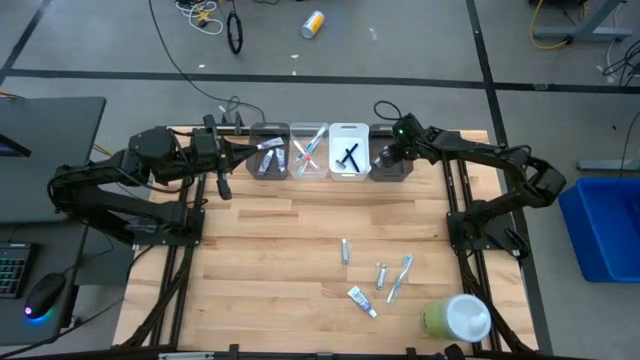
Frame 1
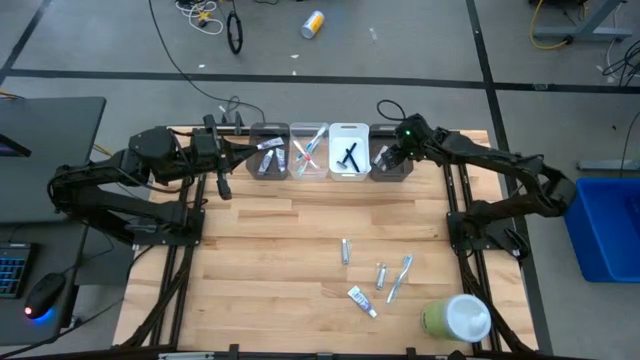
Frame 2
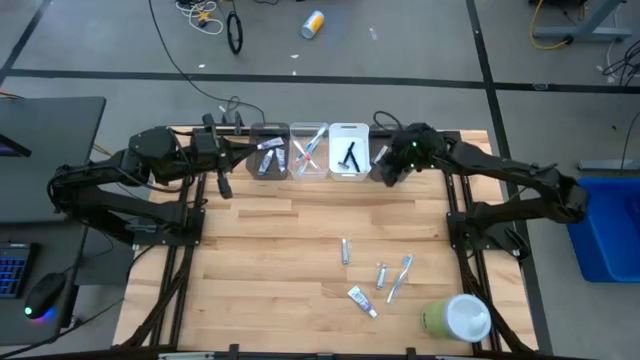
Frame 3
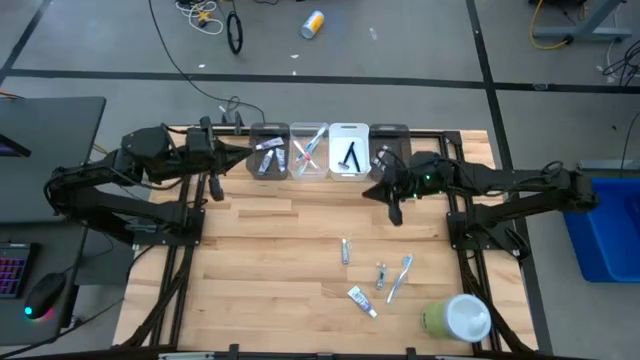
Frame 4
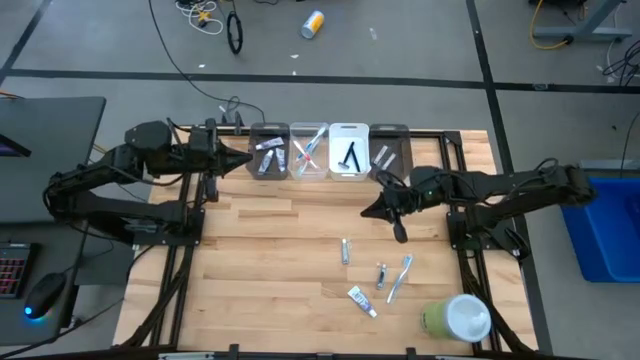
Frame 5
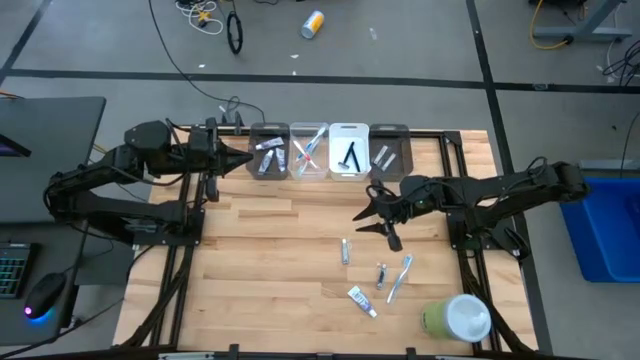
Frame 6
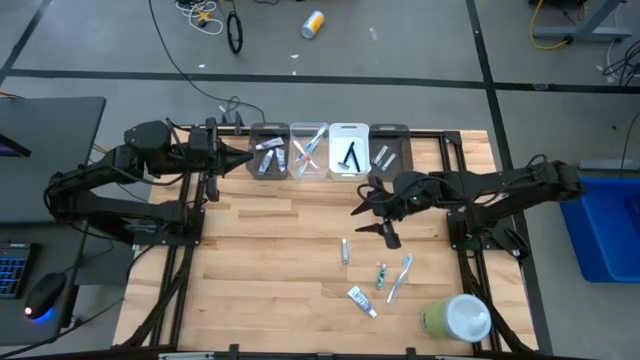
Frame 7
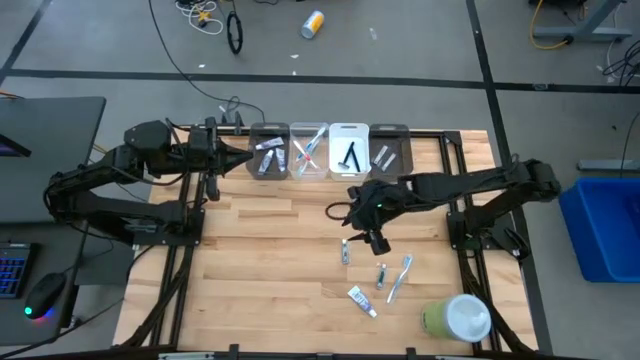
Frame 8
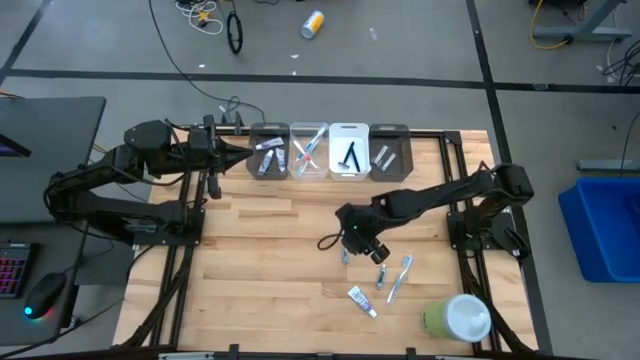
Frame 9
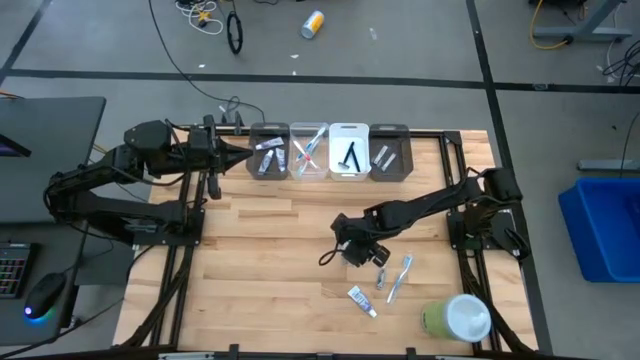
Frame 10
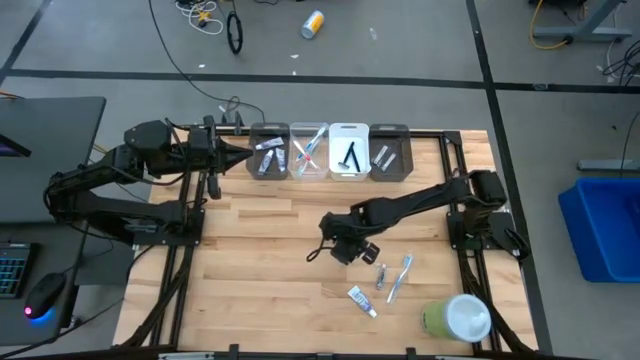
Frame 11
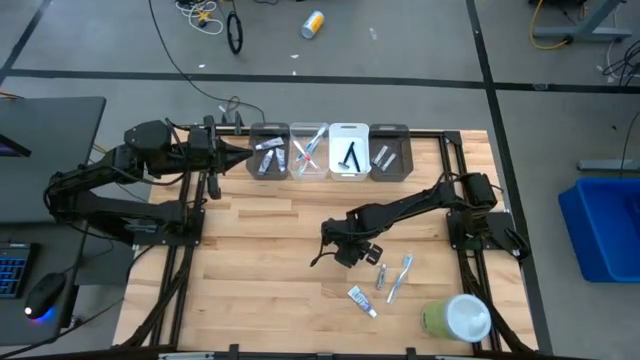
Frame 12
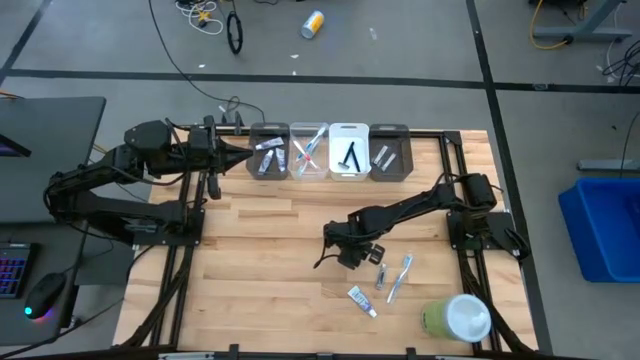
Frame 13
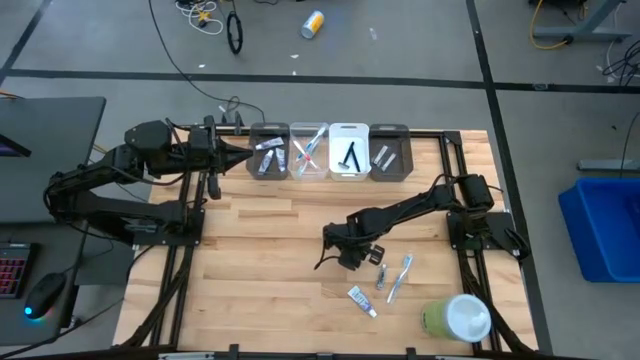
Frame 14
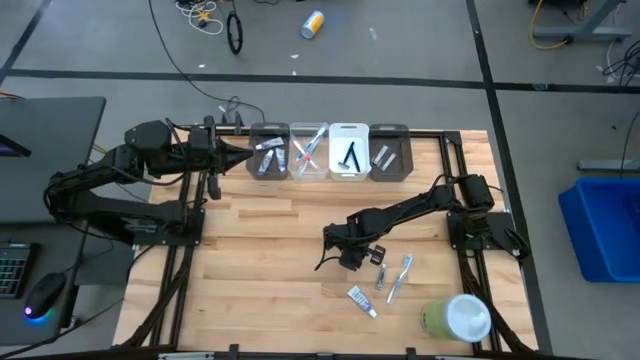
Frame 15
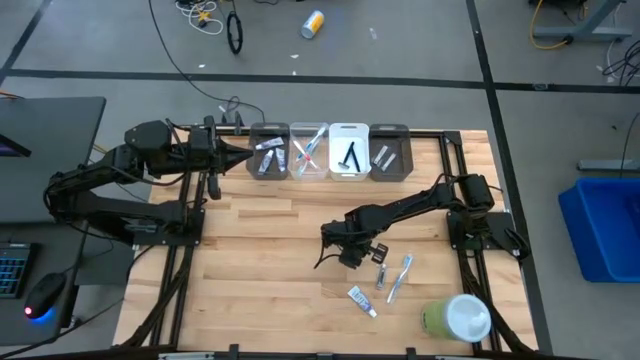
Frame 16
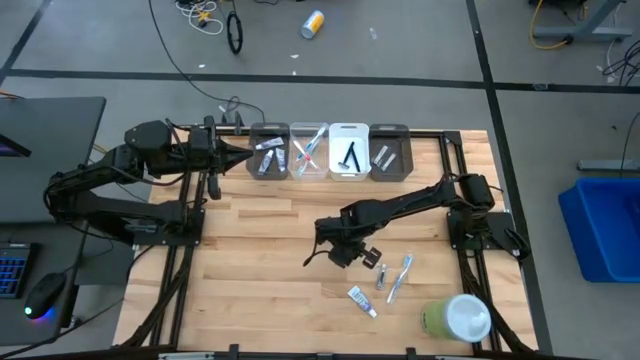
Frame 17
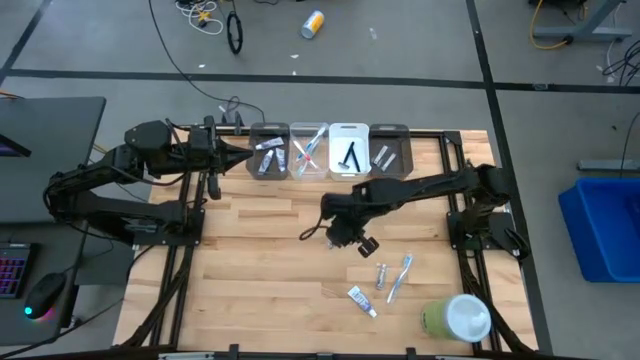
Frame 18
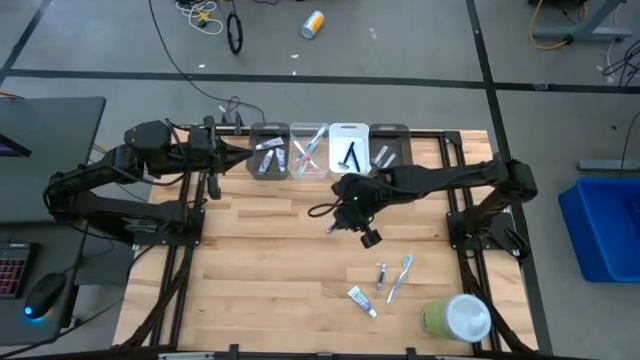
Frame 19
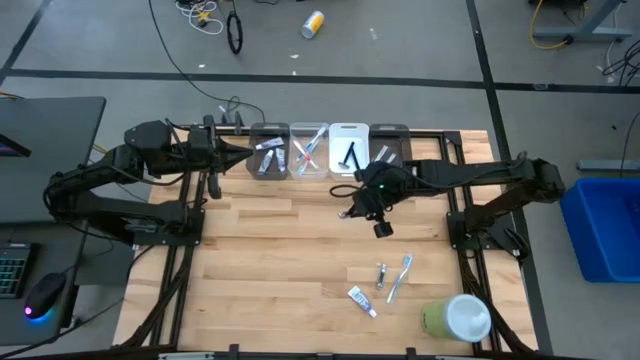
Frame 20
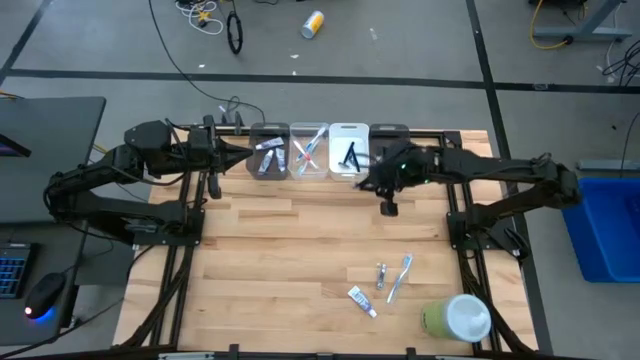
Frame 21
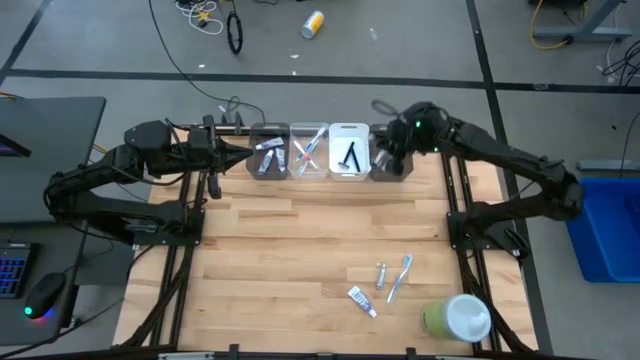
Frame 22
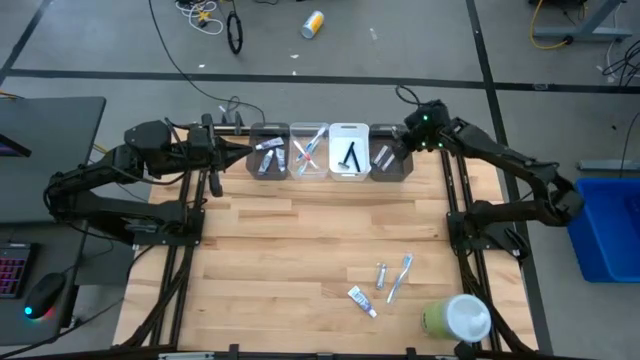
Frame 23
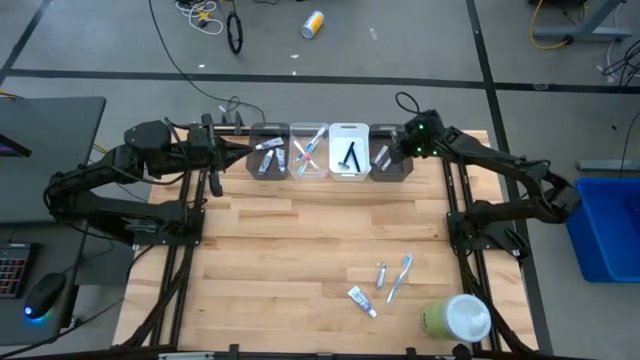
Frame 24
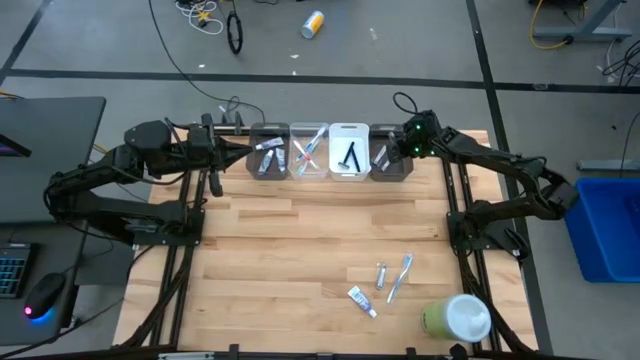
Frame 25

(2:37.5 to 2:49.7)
Task: Pick & Place Travel size toiletries
Put the silver nail cutter into the white bin

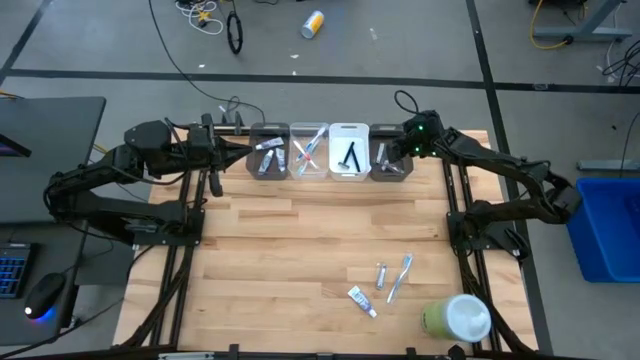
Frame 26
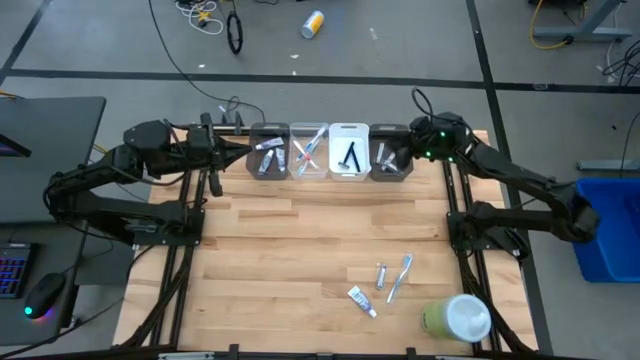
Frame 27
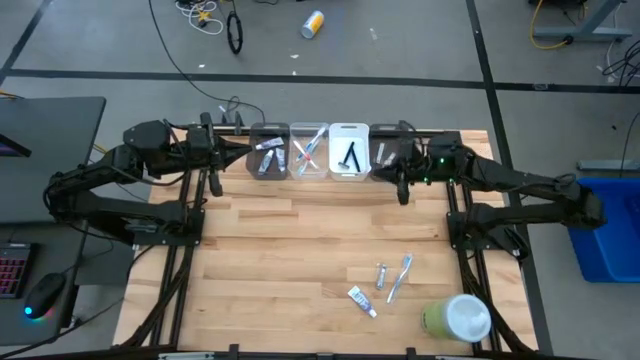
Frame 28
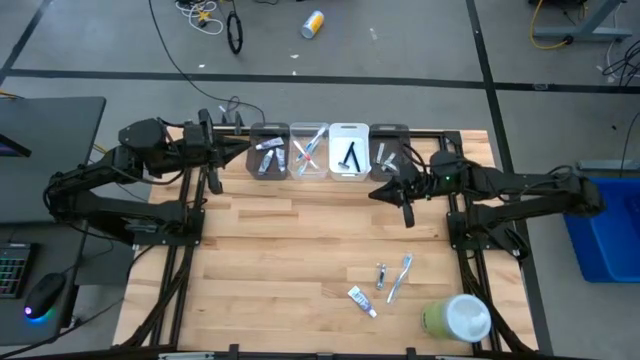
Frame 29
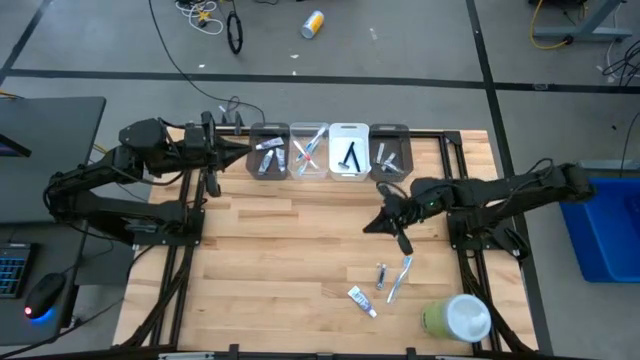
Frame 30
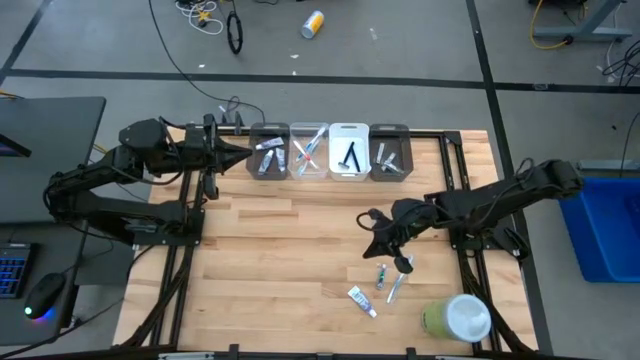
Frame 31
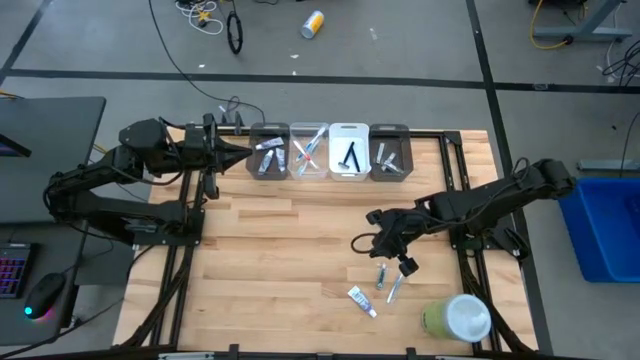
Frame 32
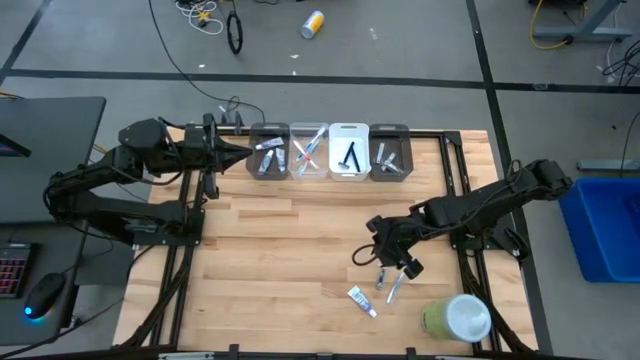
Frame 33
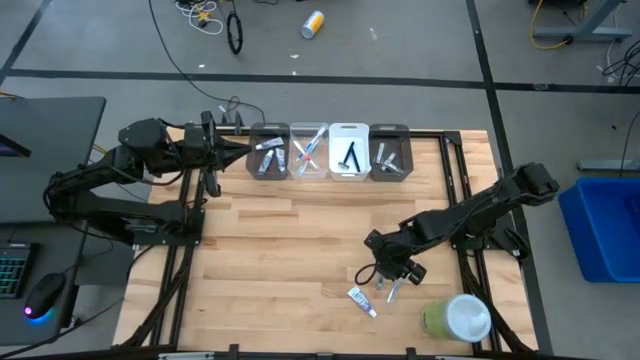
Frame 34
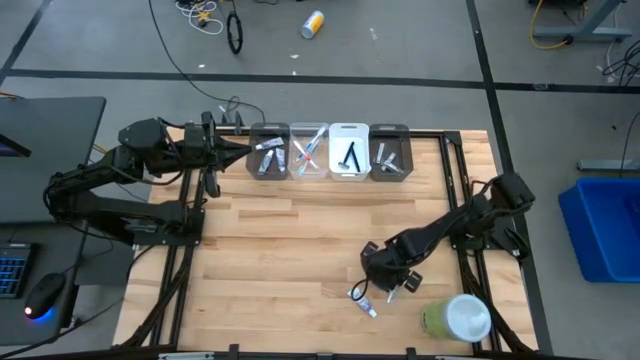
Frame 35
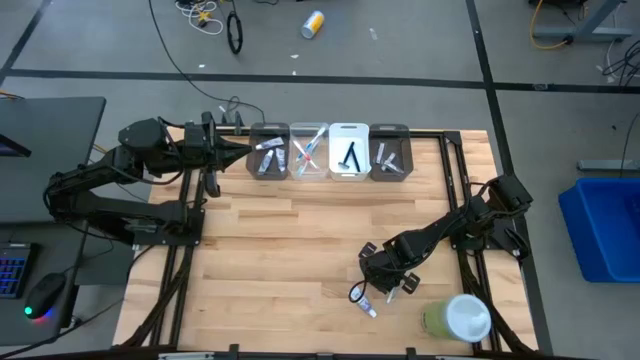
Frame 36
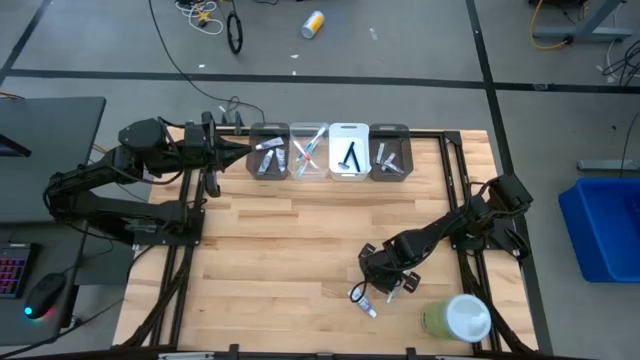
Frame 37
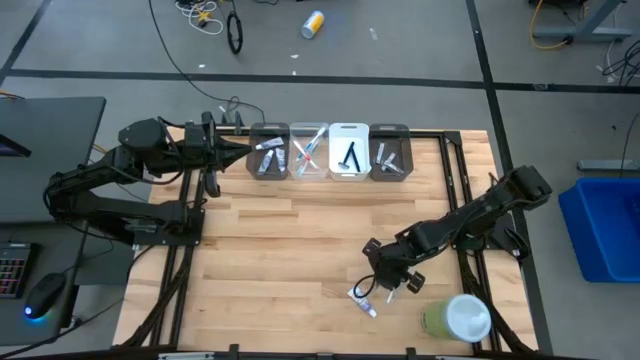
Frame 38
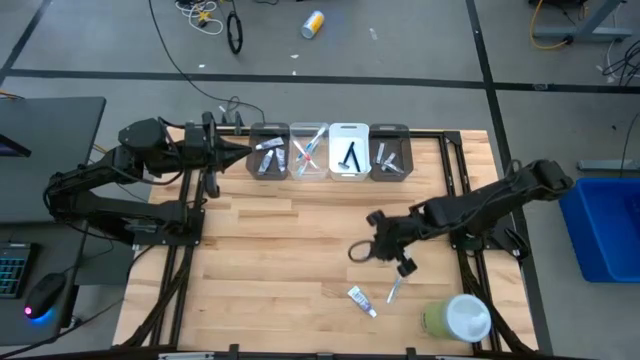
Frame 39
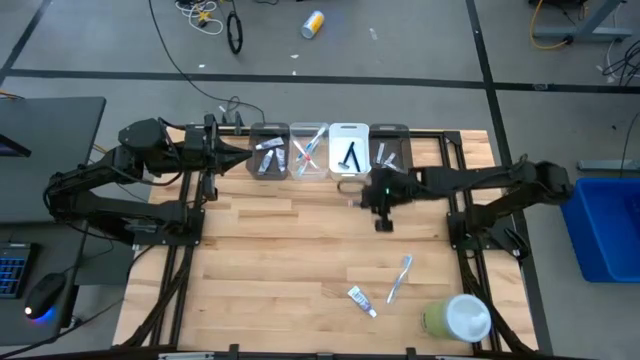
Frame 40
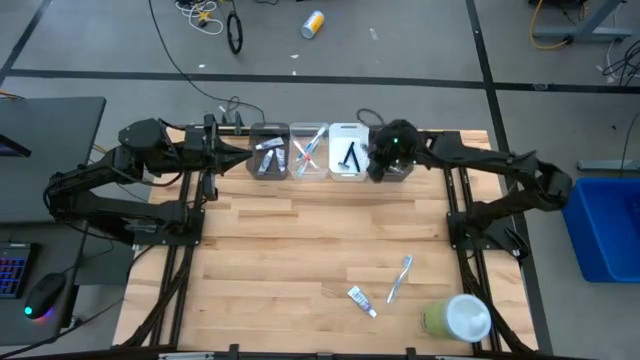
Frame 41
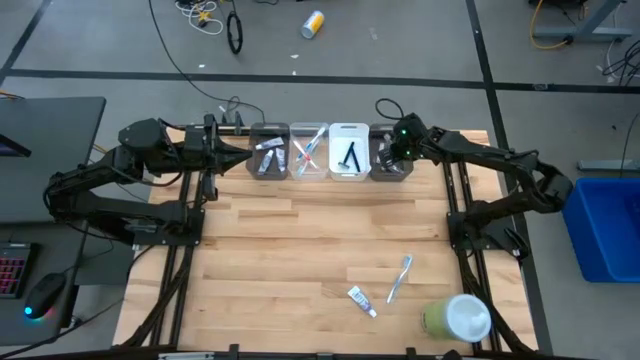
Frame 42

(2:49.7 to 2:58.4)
Put the silver nail cutter into the white bin

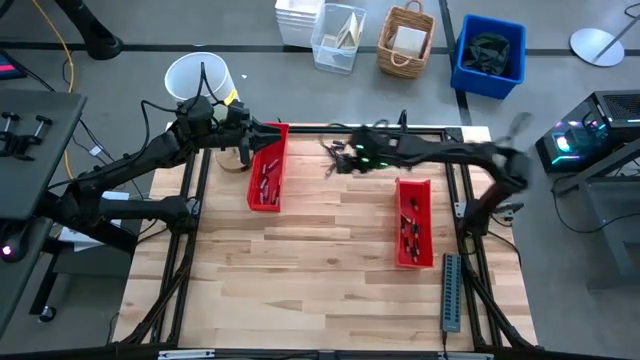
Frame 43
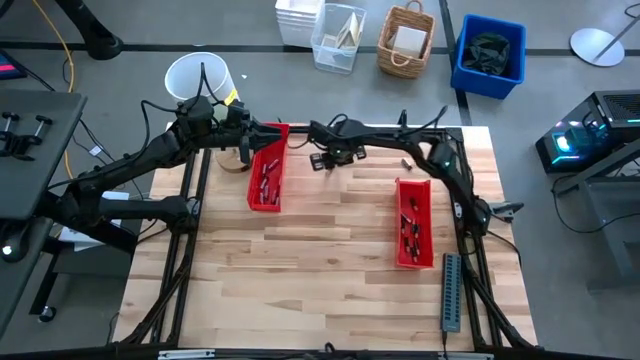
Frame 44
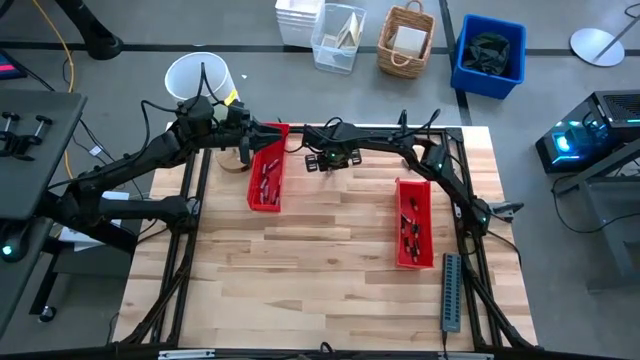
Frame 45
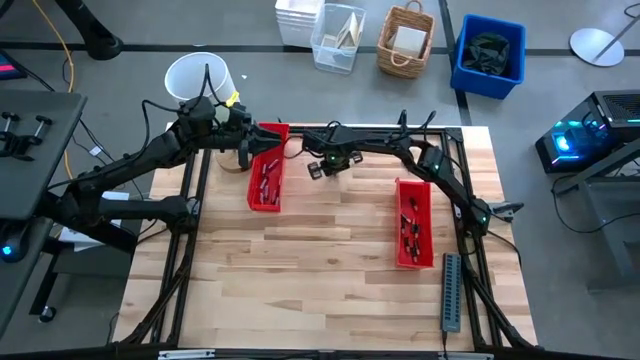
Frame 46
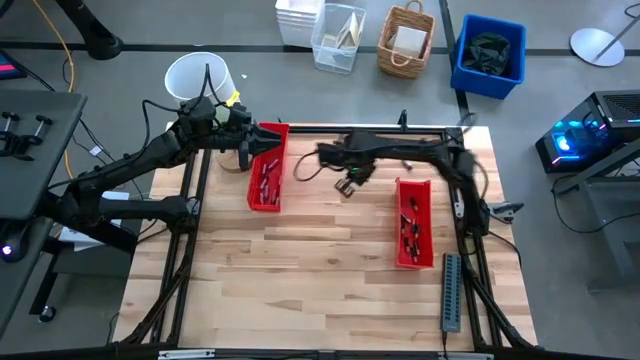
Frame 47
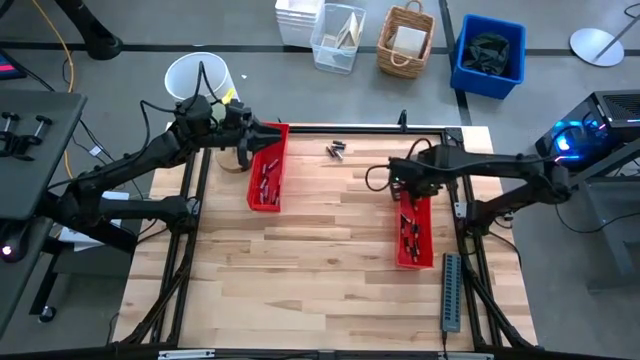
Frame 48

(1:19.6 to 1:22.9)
Task: Sort batteries
Put the black battery into the bottom red bin
